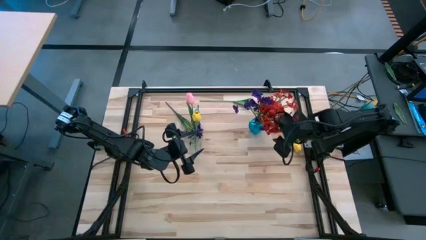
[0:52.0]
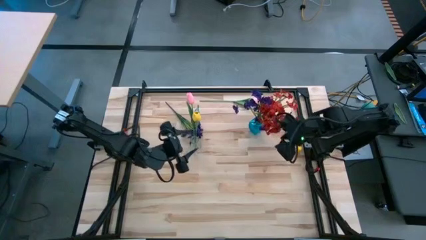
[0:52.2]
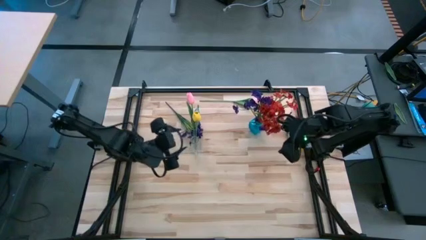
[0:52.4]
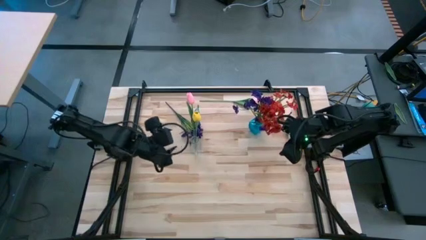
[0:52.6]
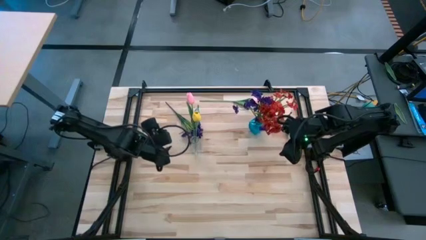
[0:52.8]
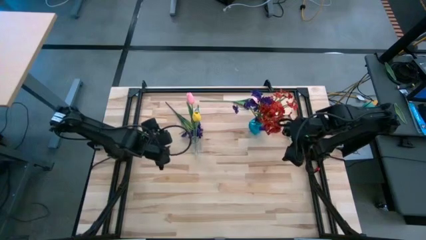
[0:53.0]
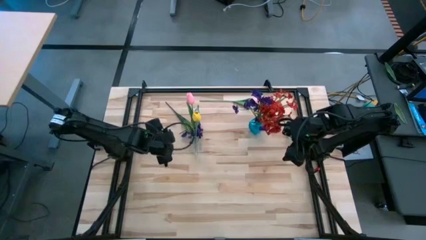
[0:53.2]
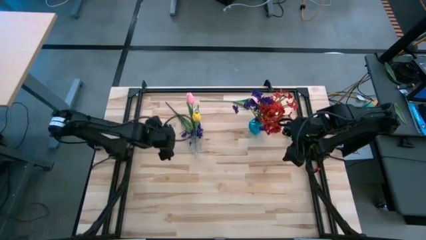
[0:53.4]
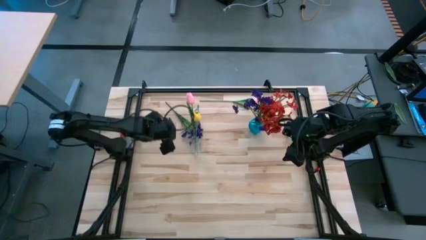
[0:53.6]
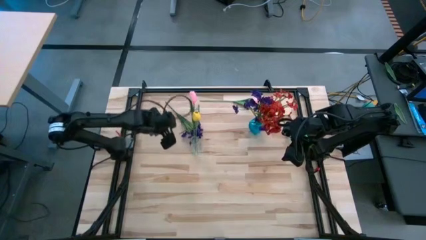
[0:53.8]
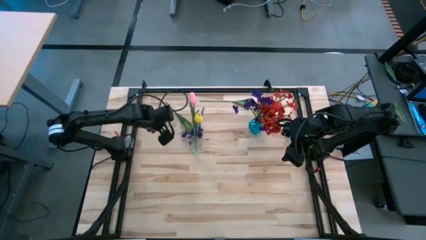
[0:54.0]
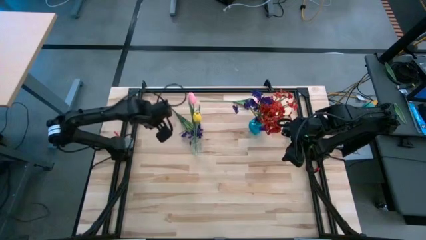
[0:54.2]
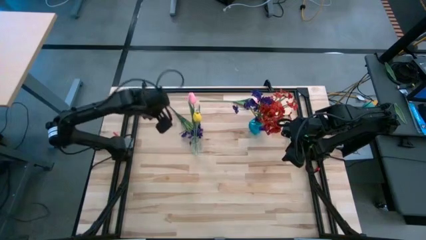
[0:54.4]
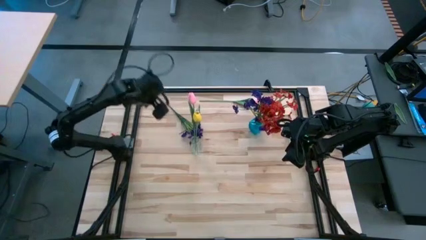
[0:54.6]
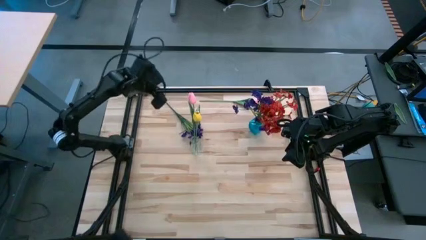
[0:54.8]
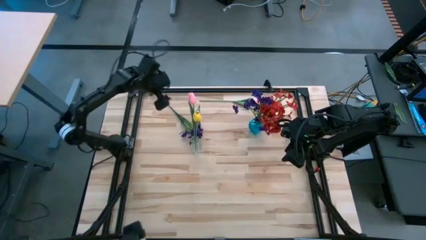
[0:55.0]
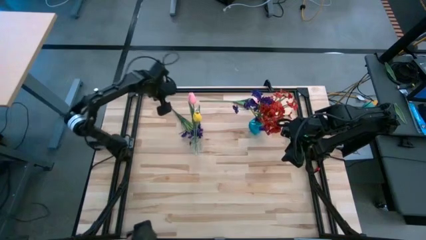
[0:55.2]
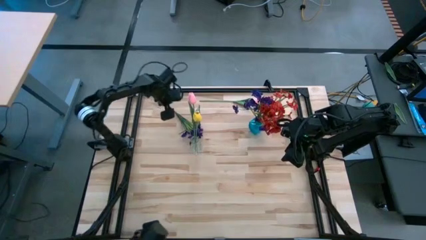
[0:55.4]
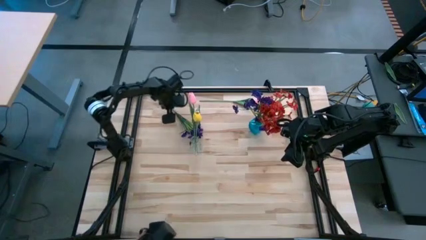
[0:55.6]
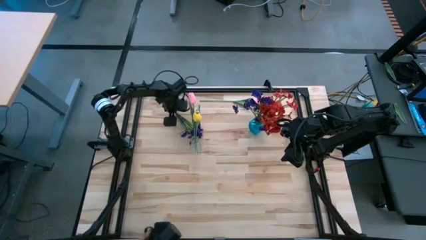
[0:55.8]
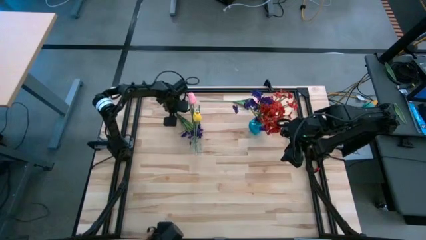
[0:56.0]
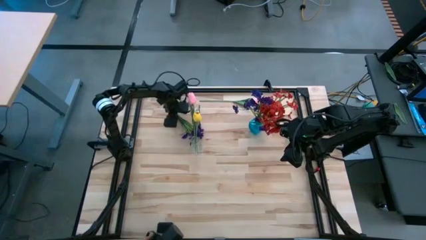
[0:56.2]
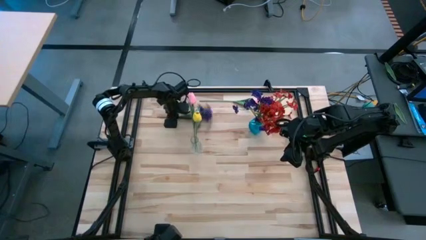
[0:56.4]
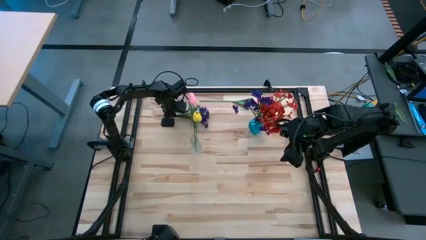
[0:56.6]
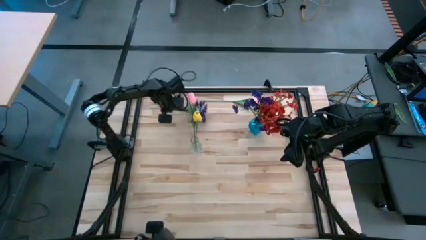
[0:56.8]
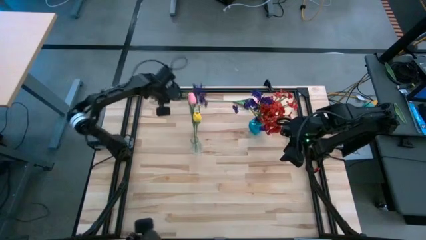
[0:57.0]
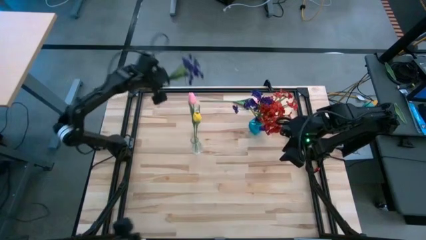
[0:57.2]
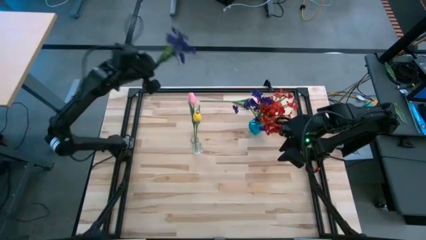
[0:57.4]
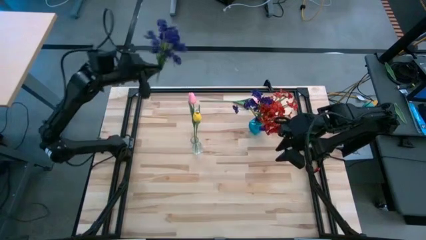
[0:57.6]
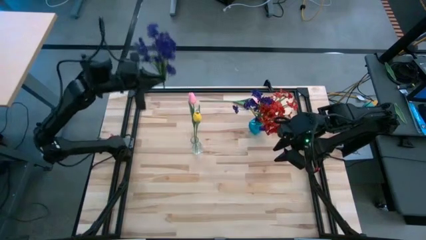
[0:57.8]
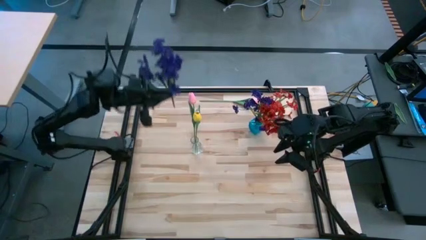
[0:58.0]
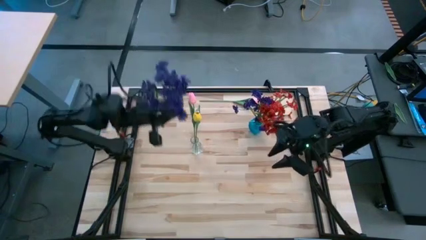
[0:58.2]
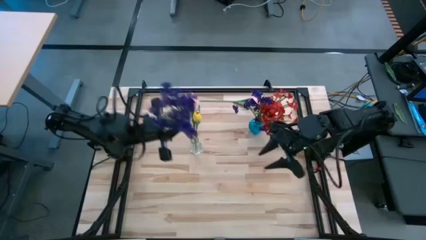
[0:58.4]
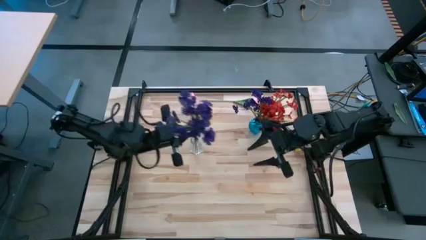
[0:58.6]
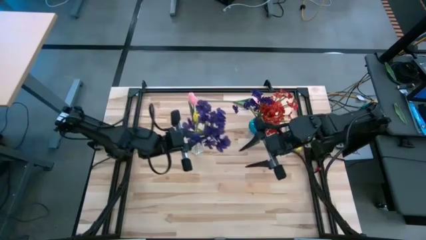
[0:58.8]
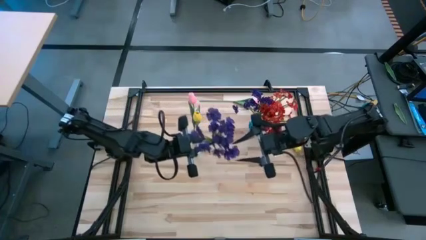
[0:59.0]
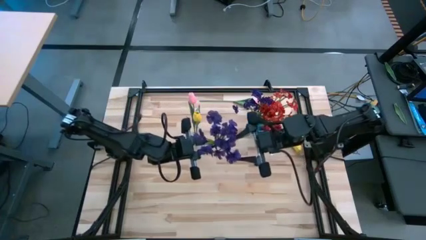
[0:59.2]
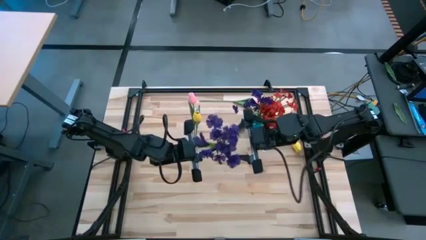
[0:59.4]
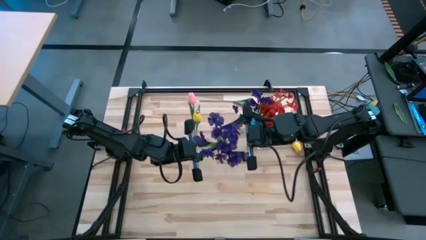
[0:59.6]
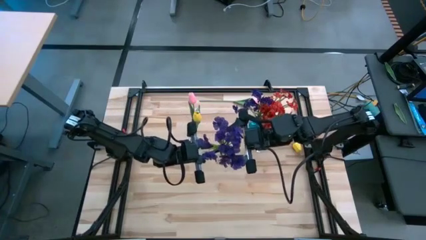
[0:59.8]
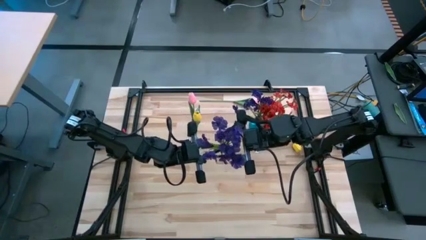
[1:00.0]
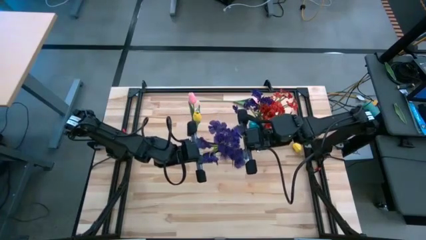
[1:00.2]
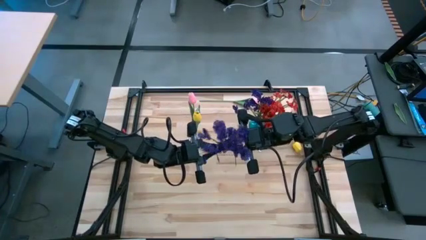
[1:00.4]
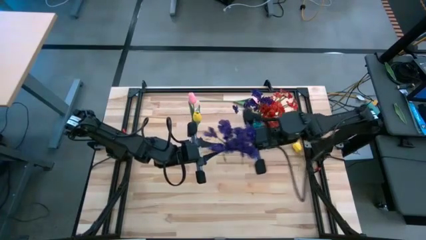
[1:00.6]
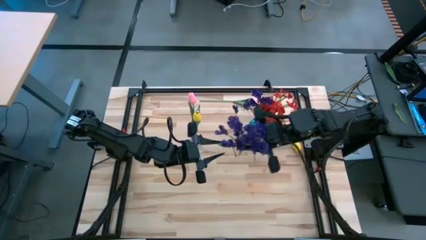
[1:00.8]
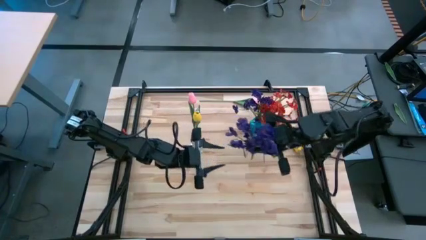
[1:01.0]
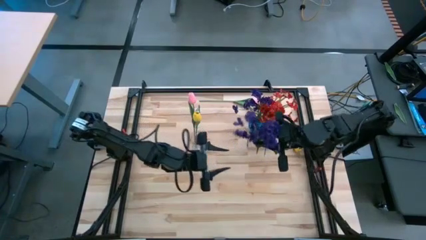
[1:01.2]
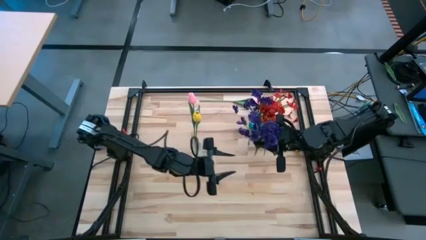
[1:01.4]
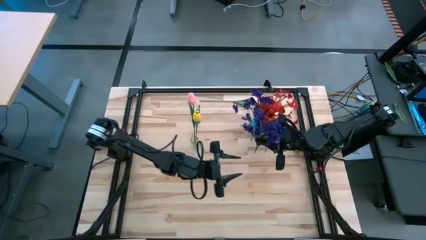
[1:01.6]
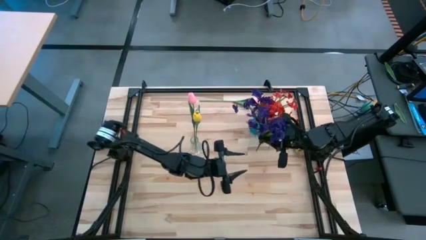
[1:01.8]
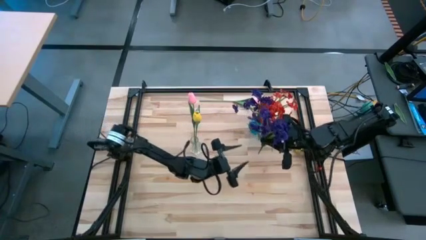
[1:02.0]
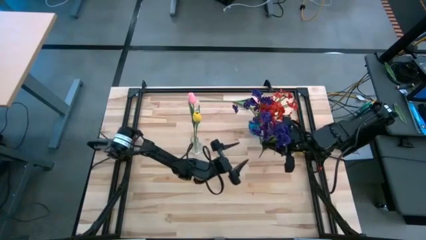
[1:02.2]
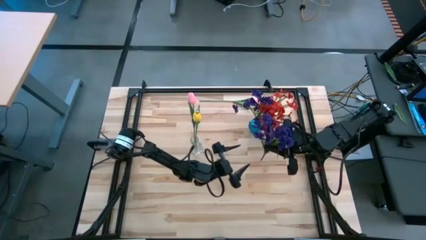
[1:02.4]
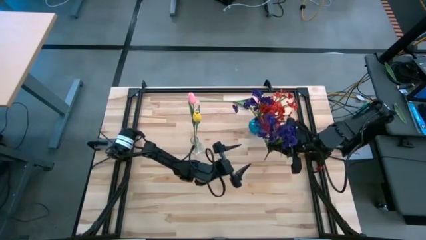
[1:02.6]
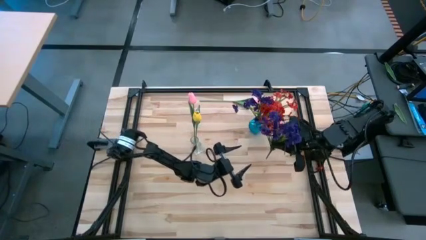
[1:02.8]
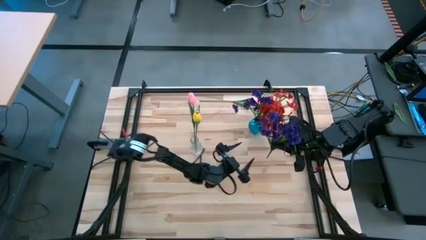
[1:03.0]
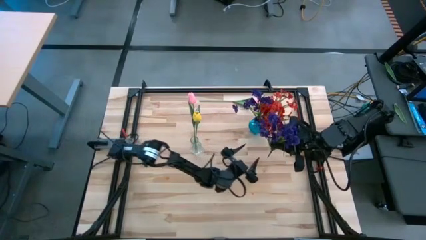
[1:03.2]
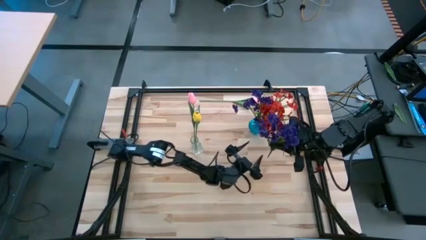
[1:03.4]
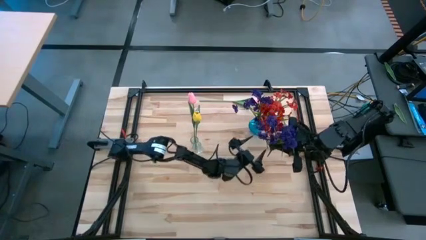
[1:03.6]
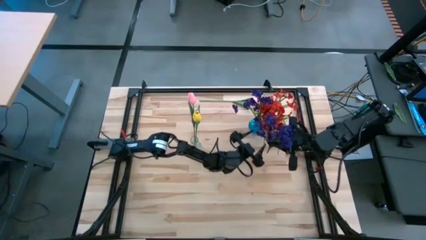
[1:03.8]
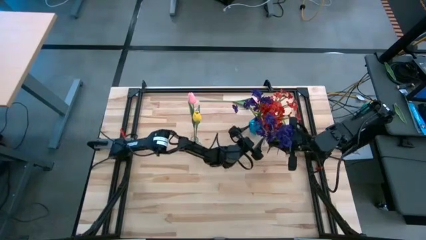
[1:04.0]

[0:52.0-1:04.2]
Task: Sort flowers into vase by color
Put the purple flower into the blue vase

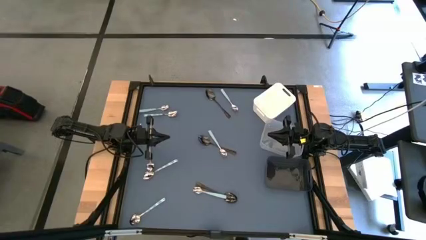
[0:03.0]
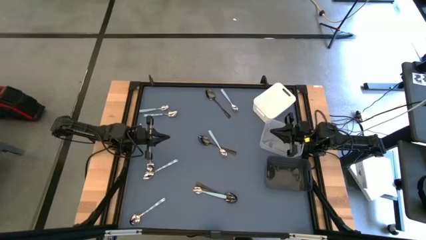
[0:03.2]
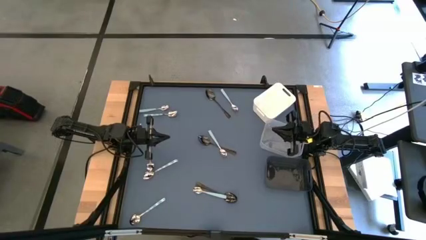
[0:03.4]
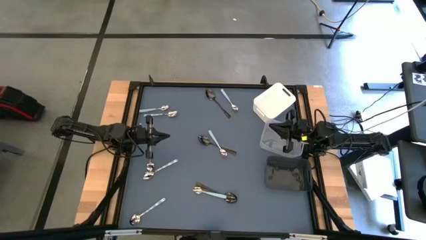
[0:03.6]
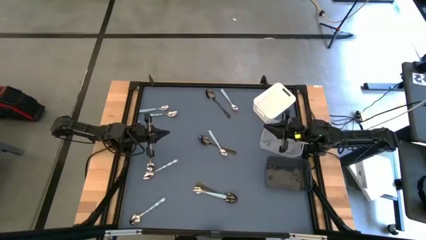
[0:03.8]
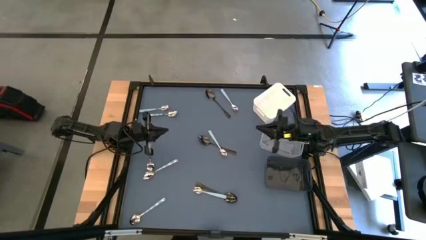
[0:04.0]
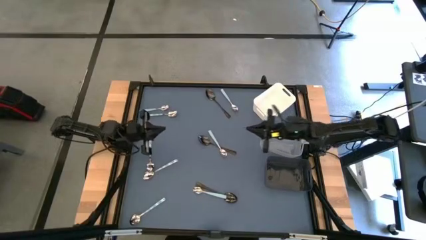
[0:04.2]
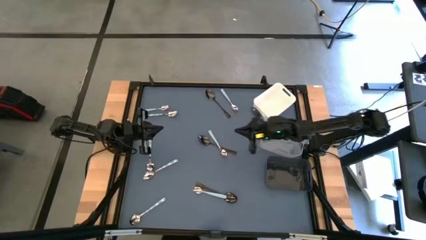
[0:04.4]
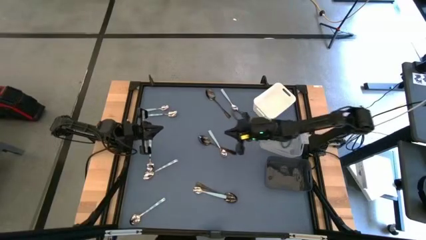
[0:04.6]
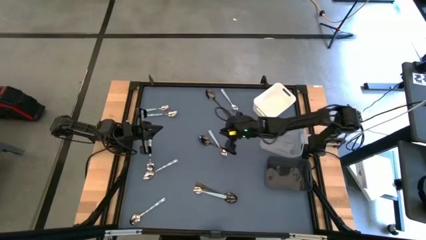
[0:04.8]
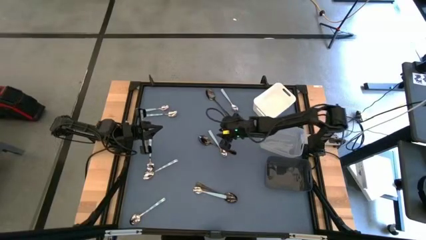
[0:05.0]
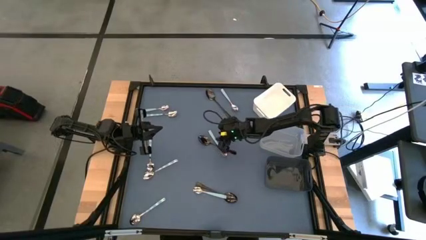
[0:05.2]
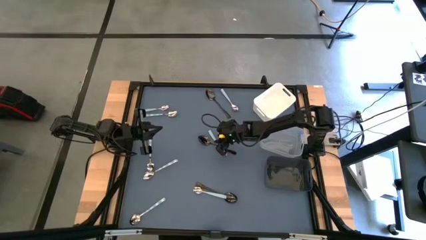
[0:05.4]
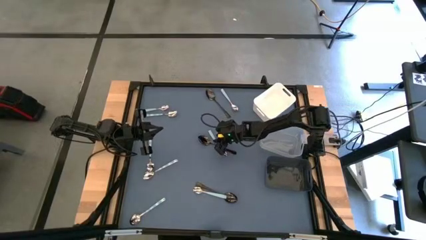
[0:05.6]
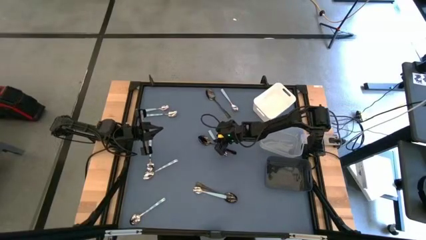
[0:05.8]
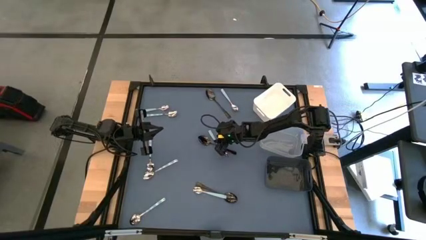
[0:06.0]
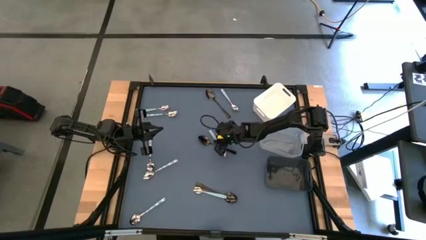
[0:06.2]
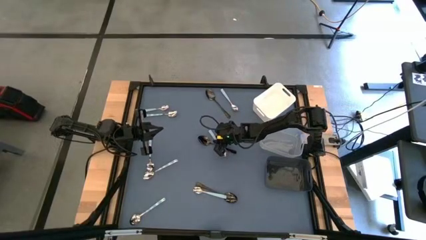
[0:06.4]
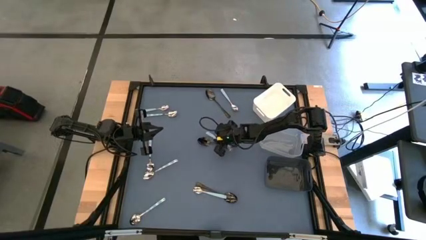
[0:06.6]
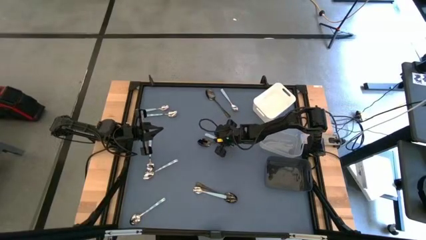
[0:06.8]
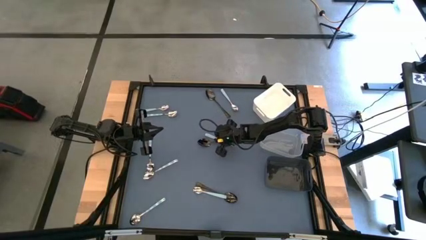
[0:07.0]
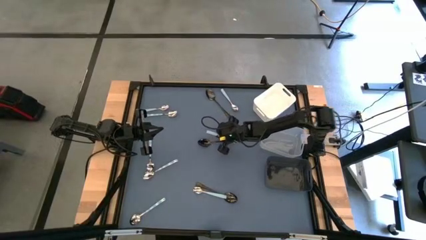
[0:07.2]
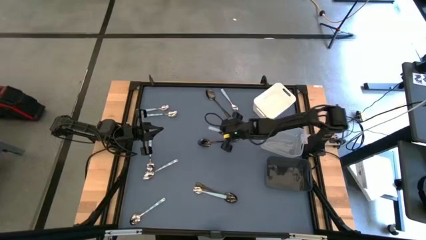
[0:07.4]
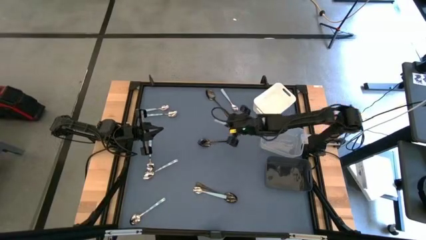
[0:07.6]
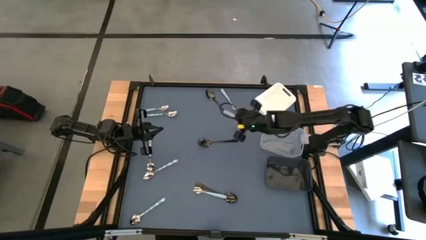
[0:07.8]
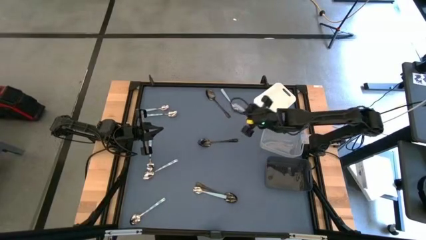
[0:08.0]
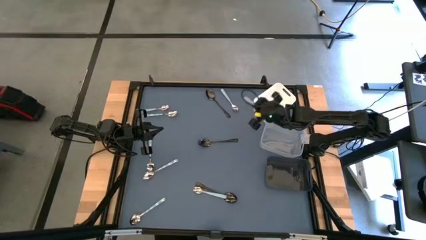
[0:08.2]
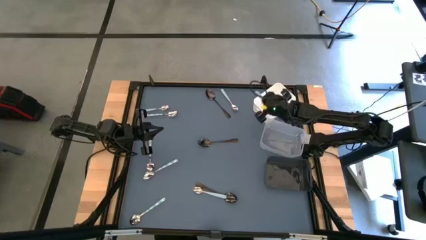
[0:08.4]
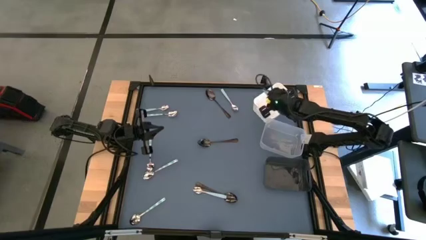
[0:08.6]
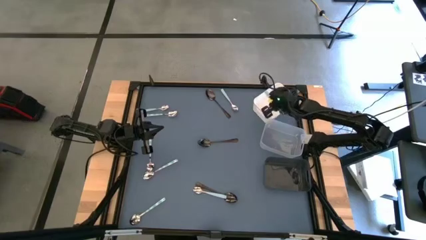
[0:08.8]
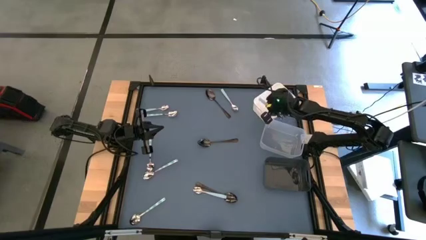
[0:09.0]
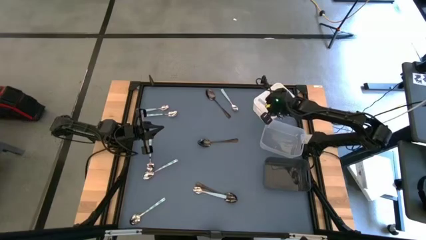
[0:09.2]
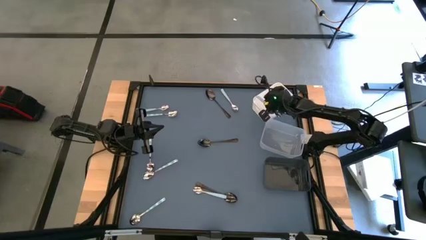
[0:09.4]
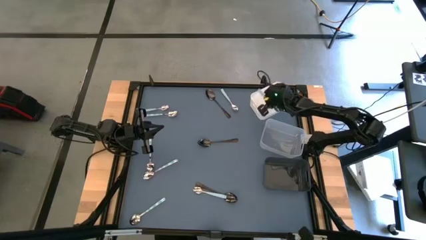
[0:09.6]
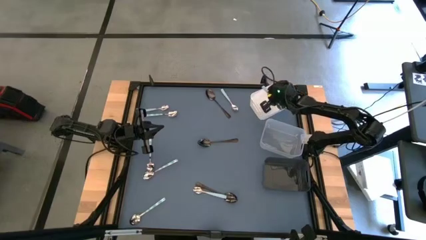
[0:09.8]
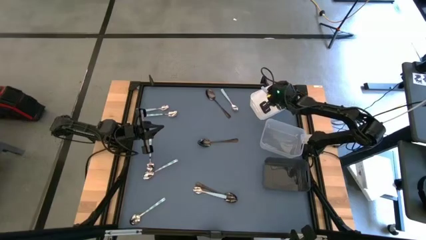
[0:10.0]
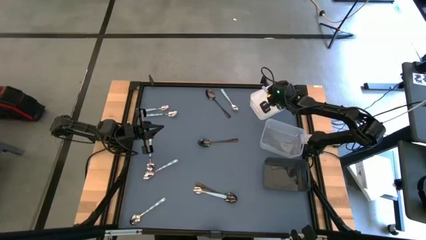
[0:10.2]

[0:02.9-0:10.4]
Task: Sort silverware by color (type)
Put the center light blue spoon into the white bin
